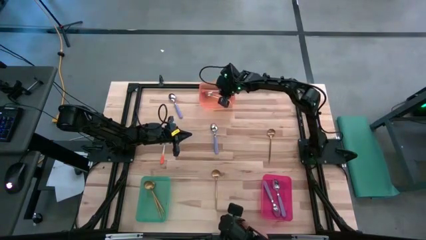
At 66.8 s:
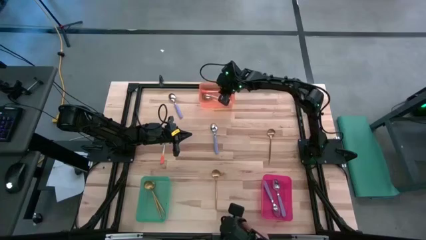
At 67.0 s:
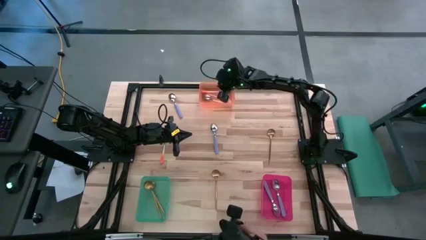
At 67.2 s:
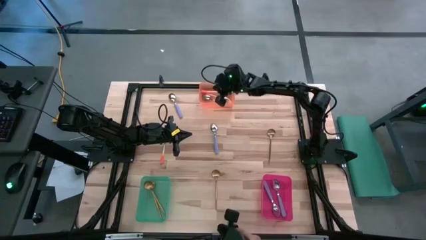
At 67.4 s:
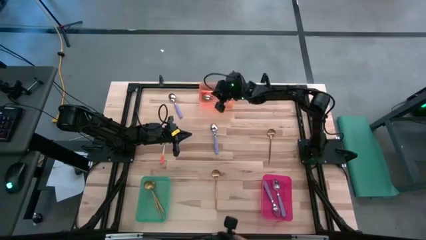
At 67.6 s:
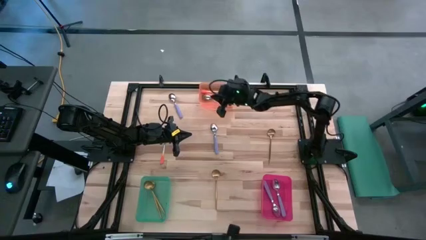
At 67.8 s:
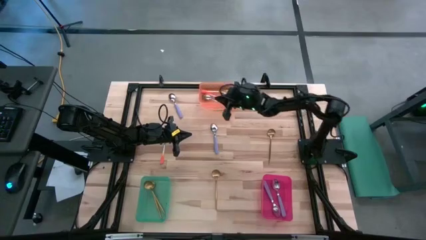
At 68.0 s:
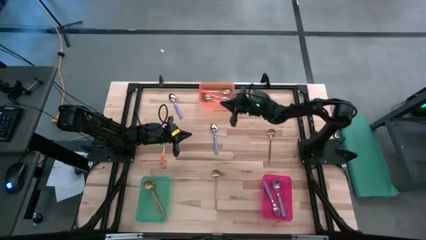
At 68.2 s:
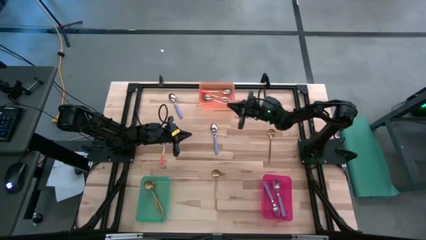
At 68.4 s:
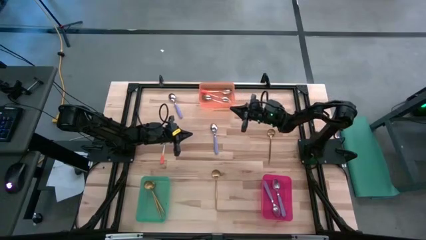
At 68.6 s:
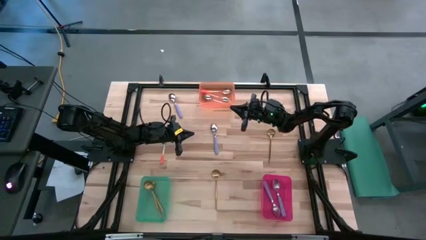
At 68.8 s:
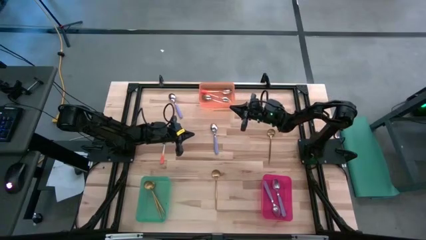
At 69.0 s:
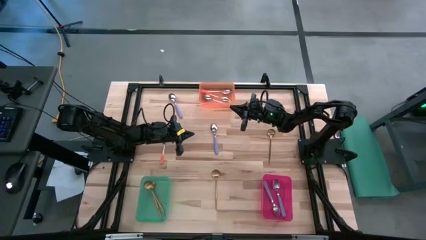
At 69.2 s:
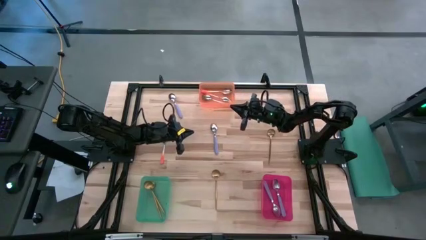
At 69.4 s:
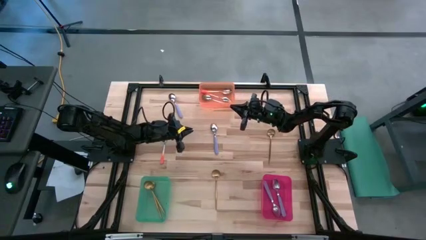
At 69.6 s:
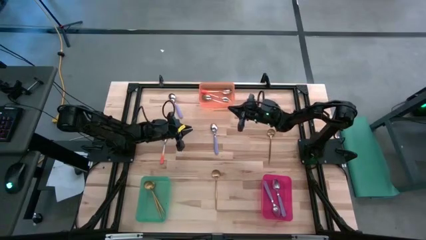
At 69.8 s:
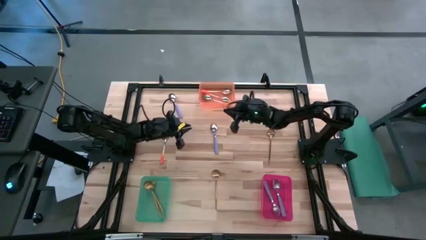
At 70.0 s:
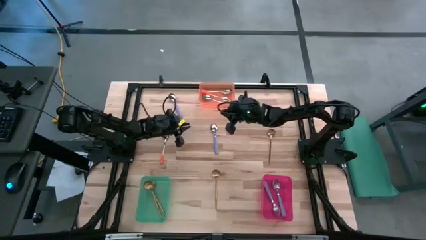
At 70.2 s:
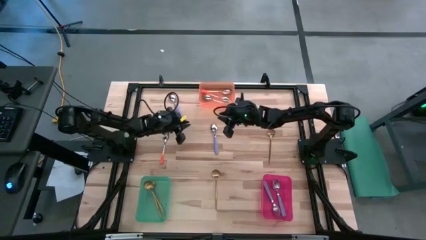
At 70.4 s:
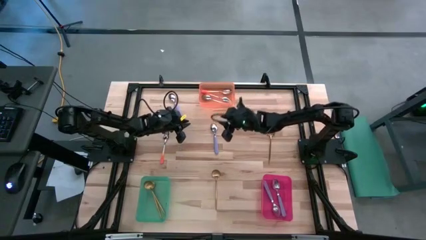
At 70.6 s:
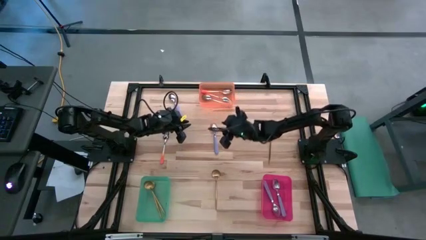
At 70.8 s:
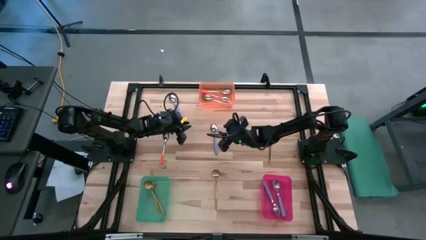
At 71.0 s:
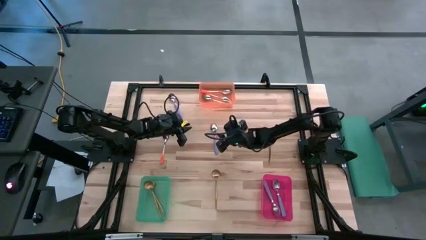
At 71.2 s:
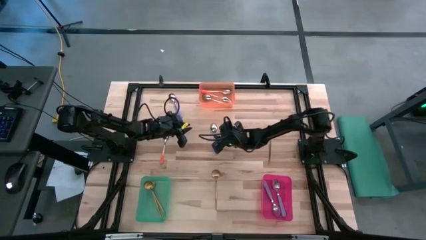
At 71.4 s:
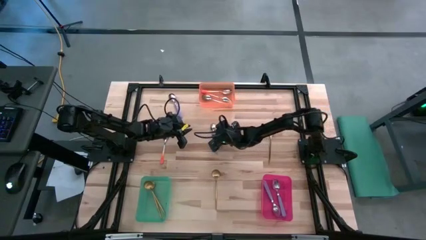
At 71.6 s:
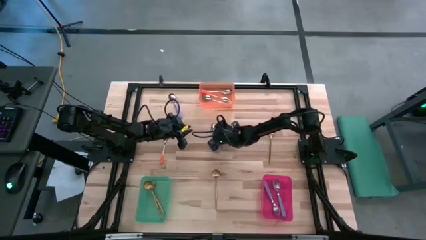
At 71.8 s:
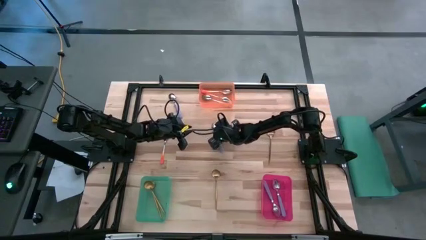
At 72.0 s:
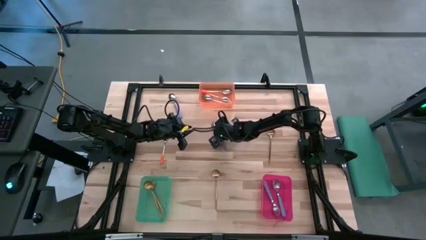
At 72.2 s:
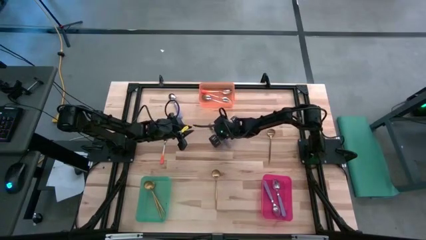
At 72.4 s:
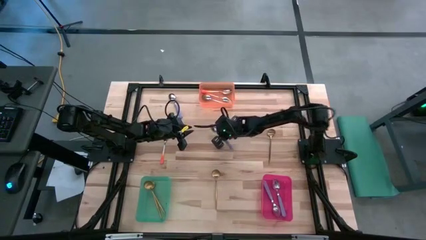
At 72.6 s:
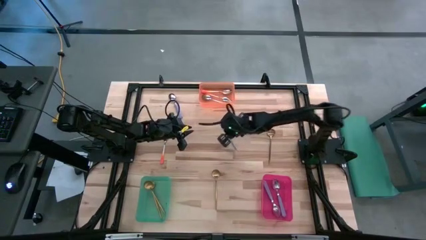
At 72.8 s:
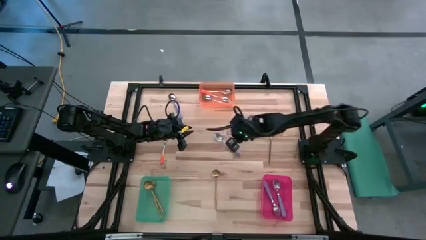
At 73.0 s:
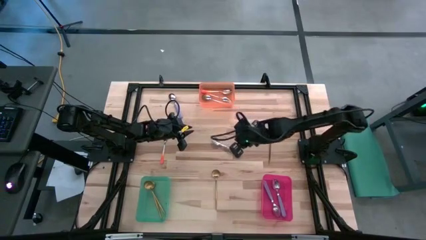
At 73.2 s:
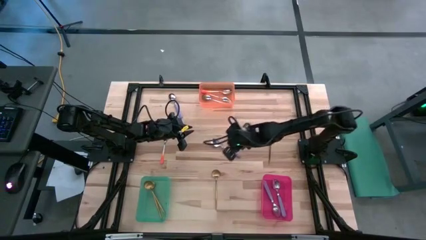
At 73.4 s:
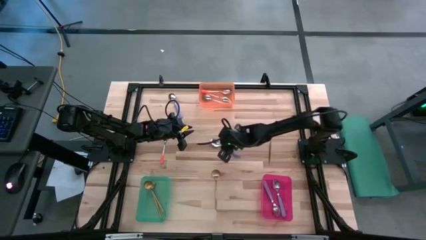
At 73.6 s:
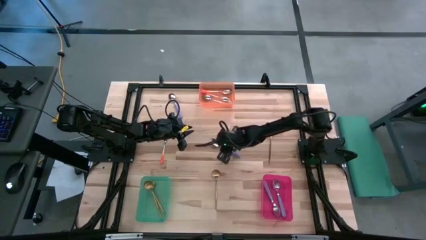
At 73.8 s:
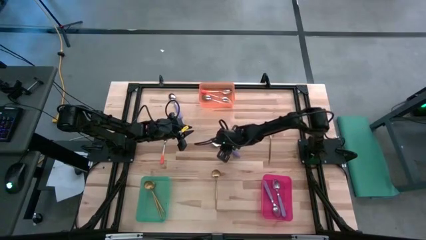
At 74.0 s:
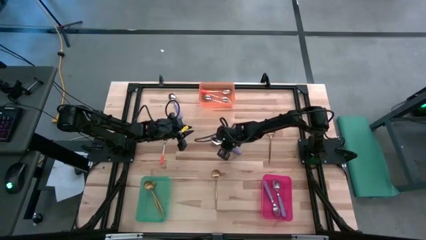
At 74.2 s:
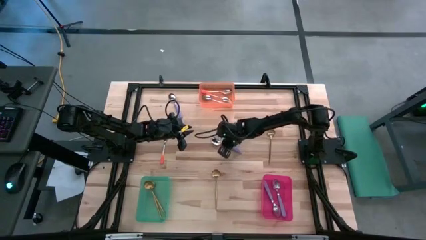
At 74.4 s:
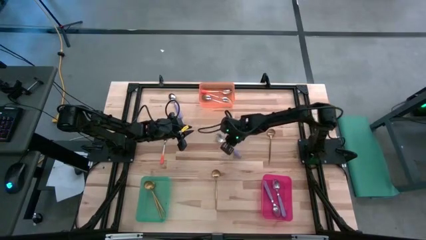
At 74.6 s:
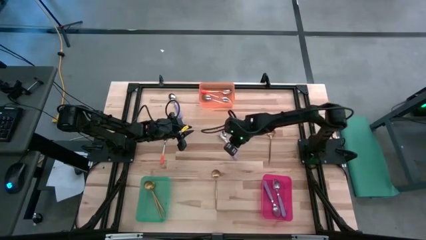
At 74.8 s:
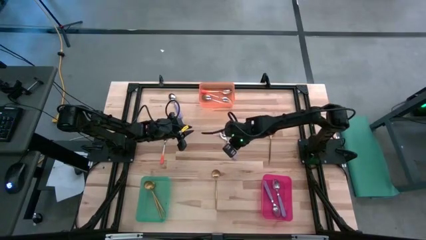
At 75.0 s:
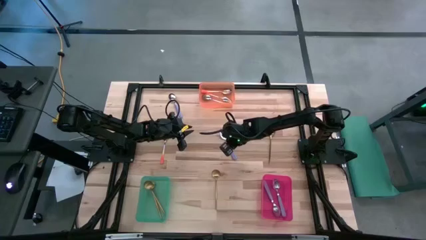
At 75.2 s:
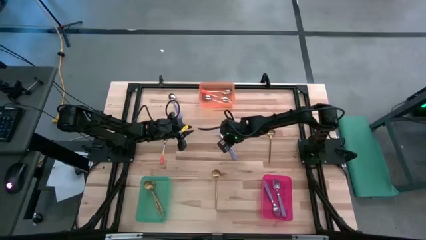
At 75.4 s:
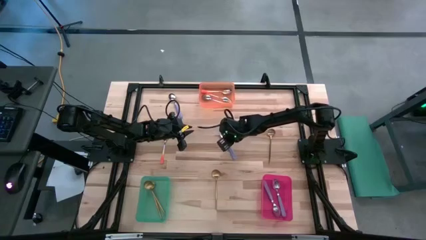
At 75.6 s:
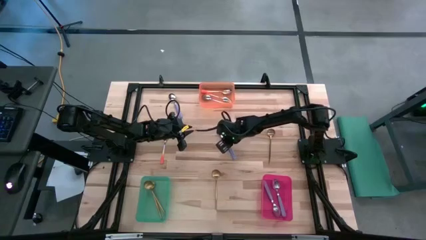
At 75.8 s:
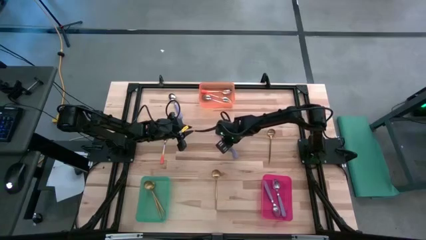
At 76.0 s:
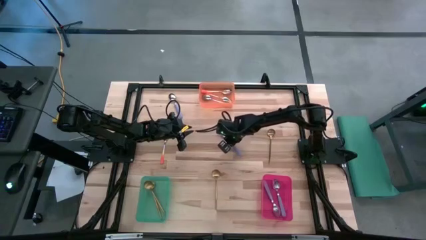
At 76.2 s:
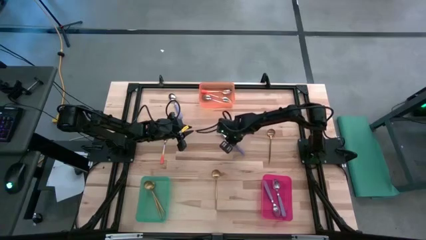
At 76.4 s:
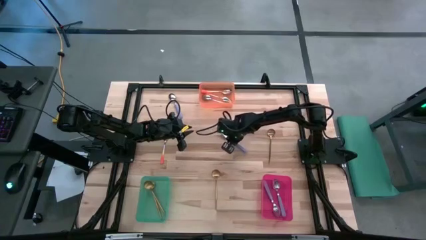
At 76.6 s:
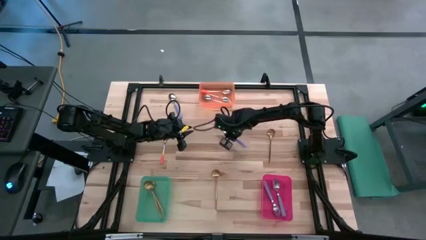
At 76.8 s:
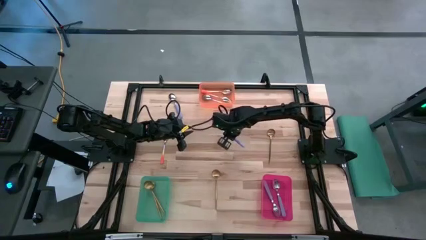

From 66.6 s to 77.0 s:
Task: Sort silverware by color (type)
Put the violet spoon into the bin

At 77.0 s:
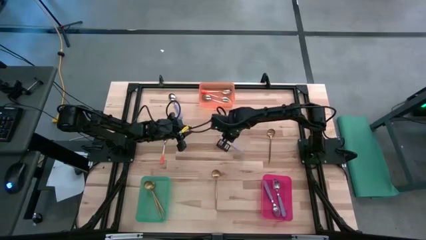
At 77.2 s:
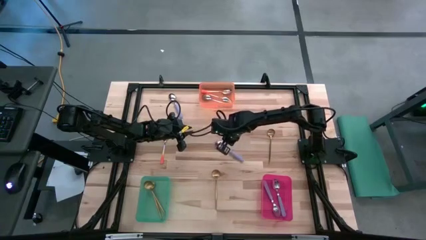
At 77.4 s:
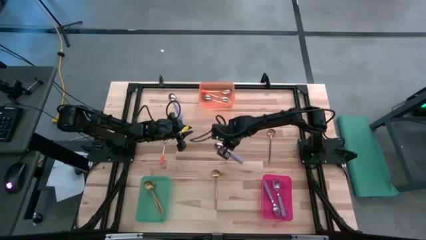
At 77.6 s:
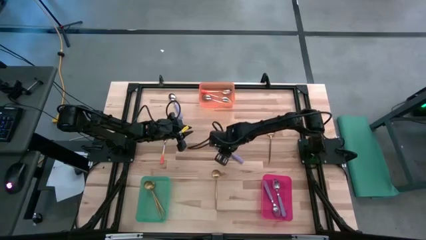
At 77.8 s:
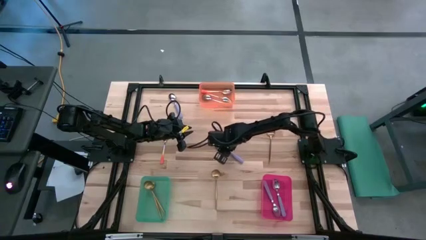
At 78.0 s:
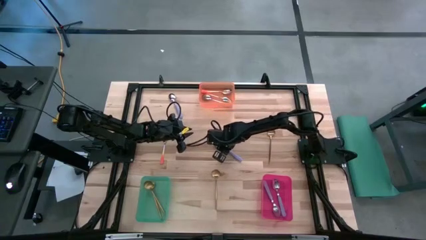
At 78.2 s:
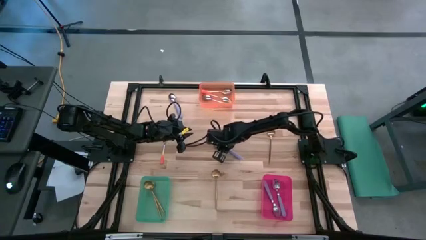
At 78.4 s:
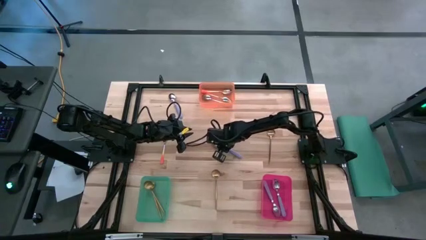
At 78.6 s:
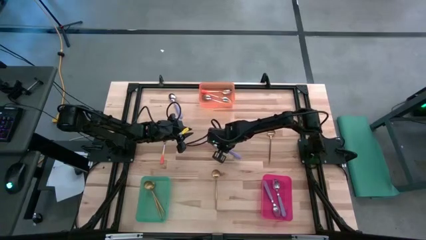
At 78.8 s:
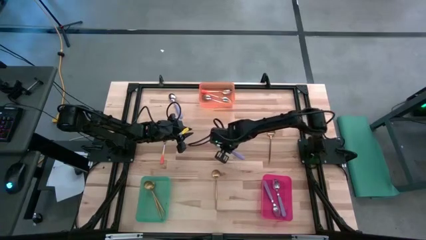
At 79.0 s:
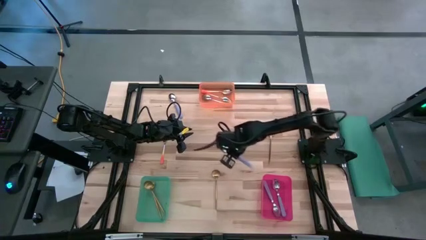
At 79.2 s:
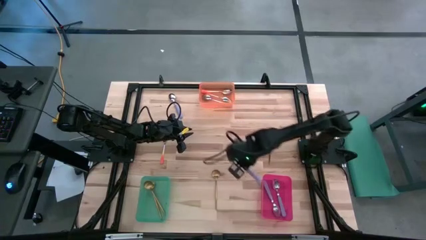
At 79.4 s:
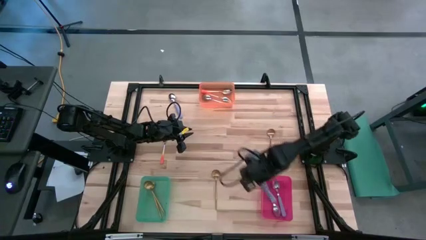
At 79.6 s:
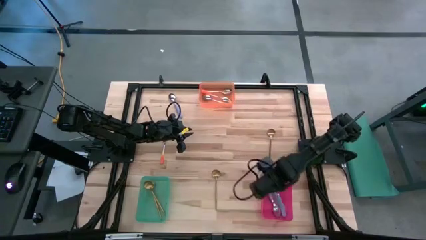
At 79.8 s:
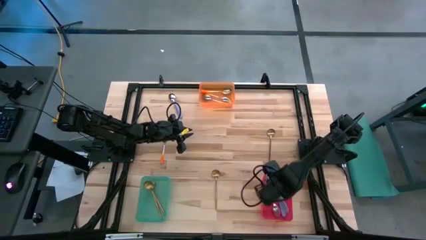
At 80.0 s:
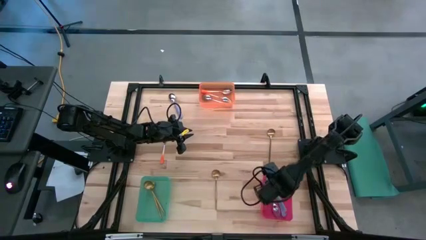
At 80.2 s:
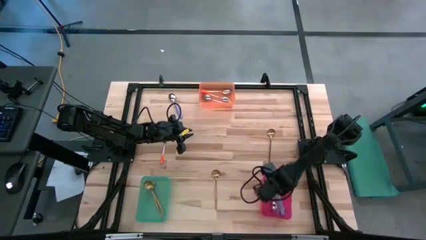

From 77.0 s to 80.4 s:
Put the violet spoon into the red bin

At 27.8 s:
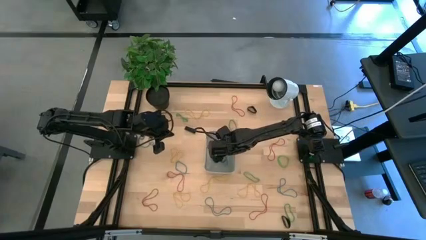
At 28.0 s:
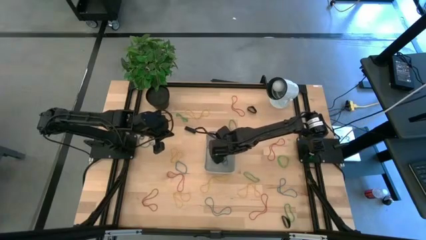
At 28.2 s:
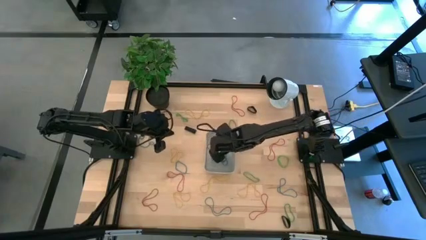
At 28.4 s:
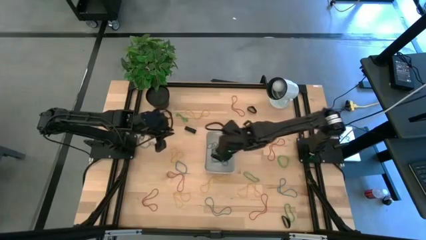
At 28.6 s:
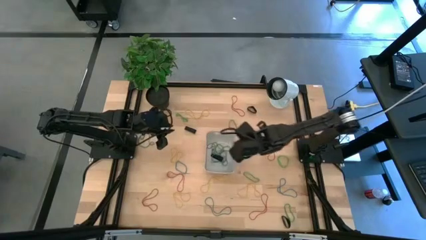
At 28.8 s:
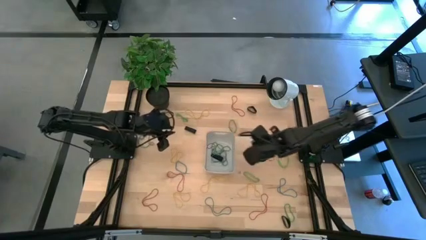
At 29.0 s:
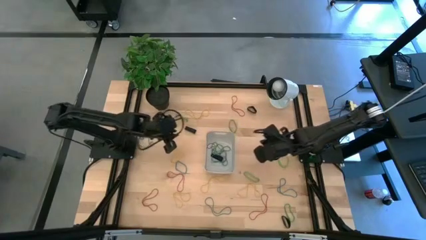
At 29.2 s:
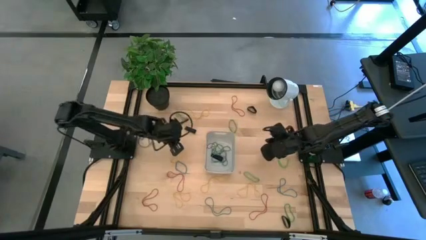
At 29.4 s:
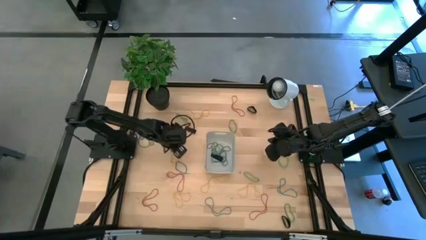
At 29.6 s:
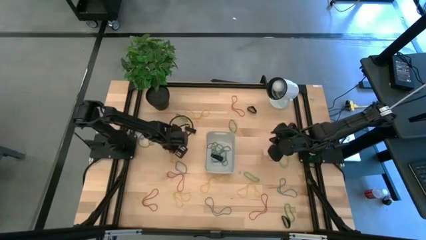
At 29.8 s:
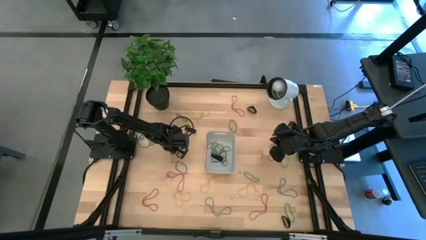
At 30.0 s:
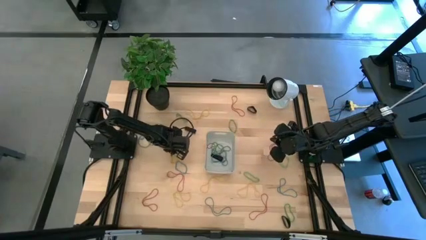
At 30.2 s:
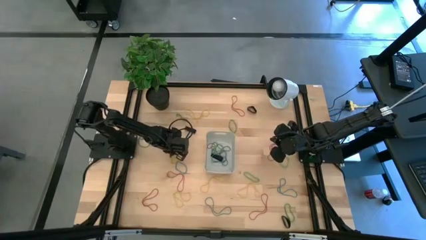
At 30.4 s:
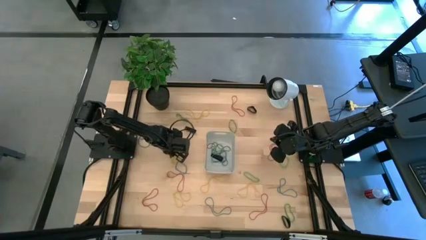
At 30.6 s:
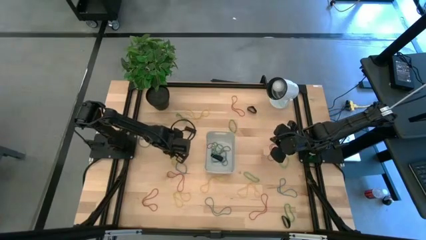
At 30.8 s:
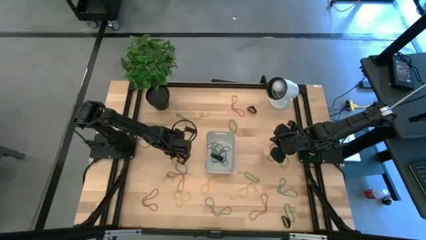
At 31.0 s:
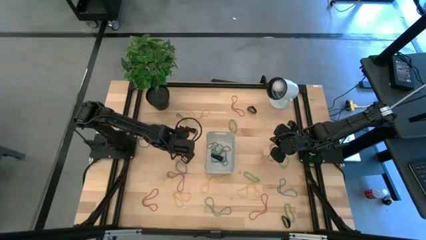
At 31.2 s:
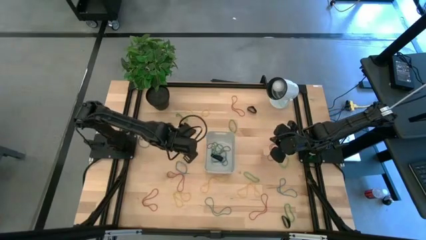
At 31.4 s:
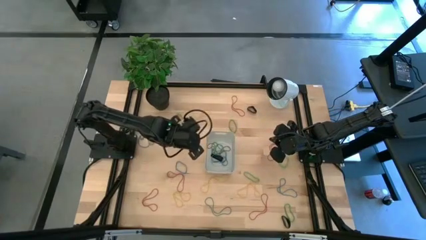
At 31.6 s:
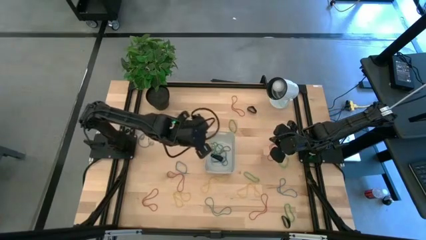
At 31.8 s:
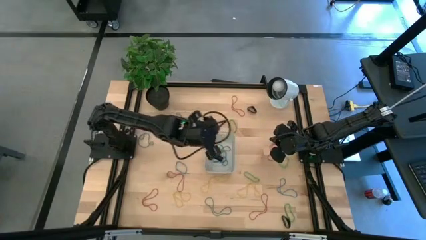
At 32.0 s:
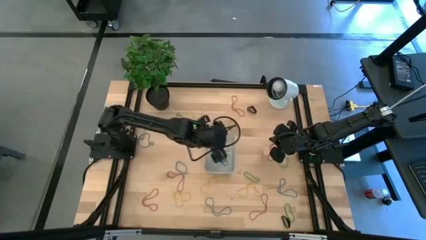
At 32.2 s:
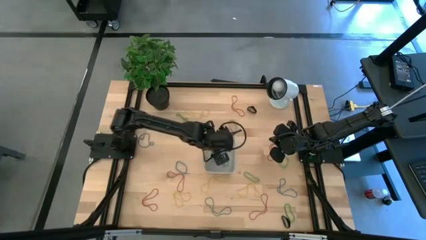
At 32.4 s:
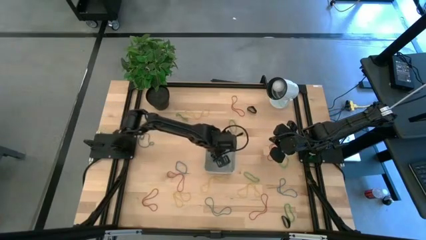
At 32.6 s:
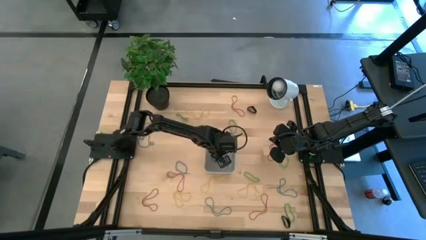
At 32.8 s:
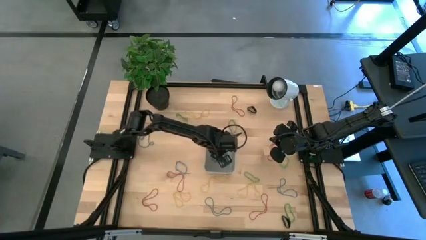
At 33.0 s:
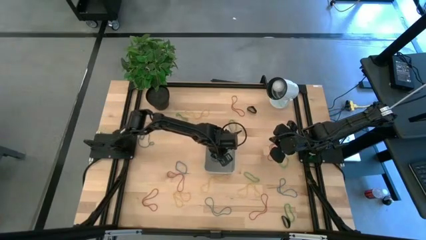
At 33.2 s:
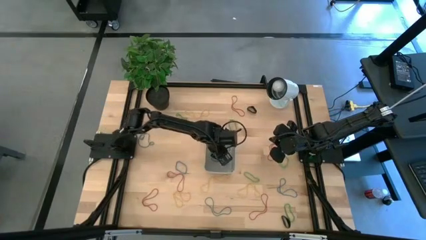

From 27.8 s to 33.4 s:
Task: Pick and place rubber bands into bin
Put the yellow rubber band into the gray bin
